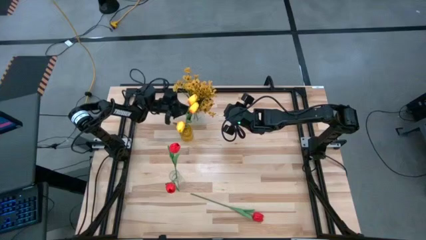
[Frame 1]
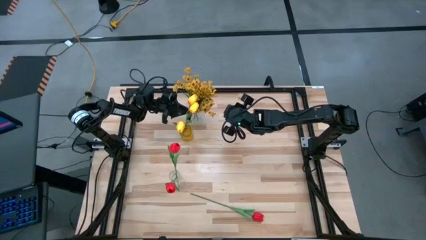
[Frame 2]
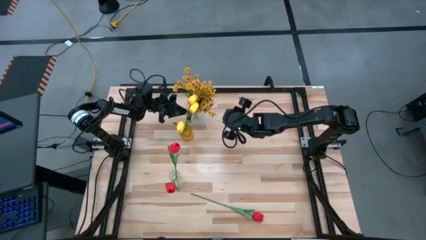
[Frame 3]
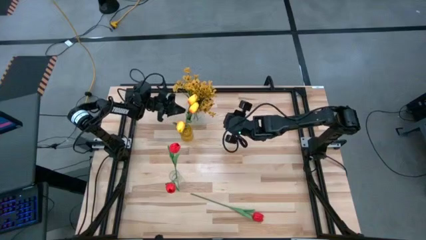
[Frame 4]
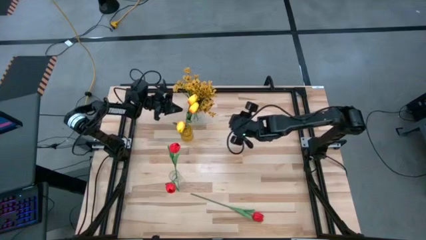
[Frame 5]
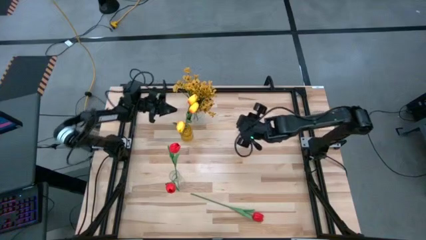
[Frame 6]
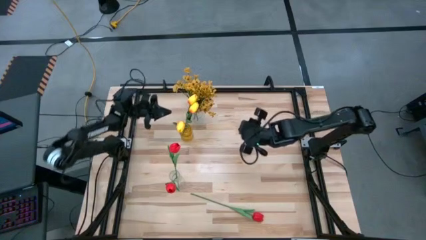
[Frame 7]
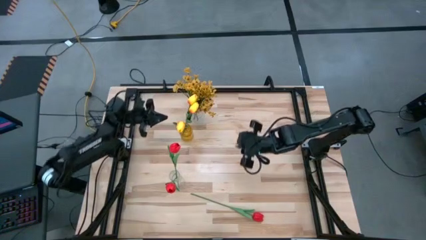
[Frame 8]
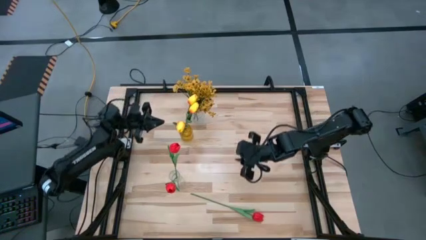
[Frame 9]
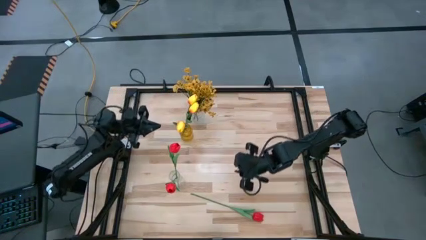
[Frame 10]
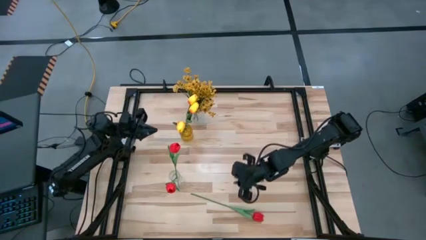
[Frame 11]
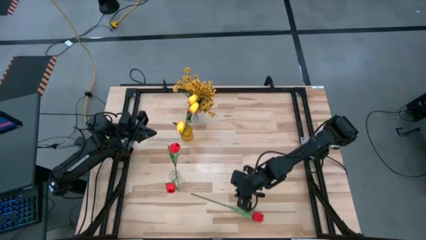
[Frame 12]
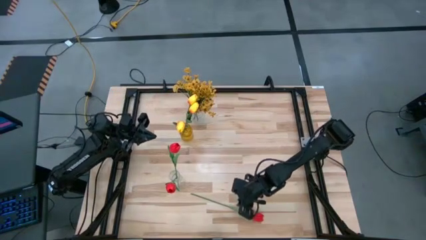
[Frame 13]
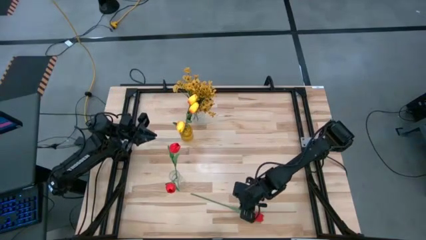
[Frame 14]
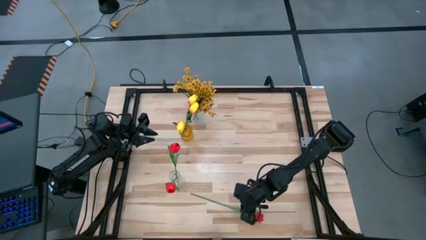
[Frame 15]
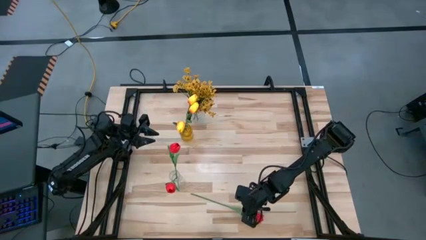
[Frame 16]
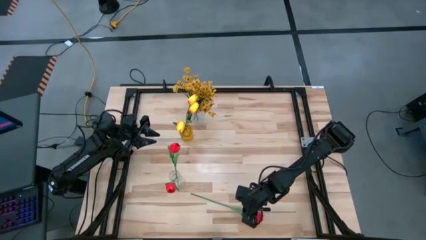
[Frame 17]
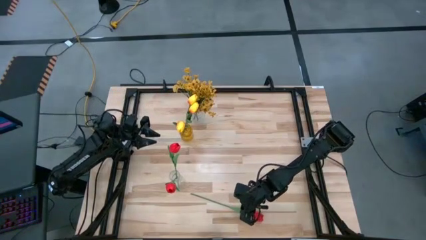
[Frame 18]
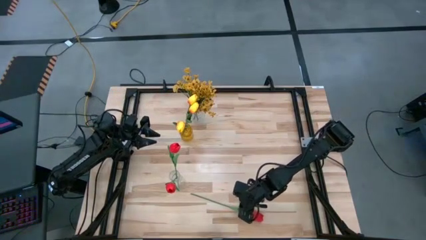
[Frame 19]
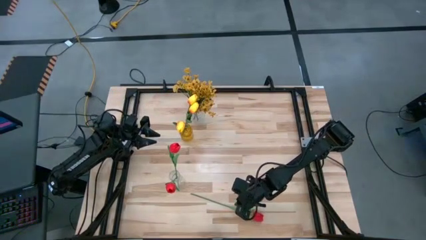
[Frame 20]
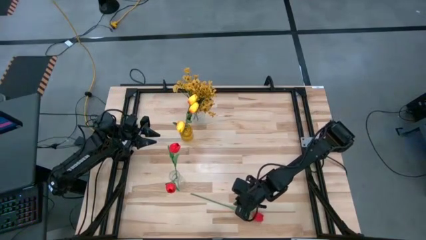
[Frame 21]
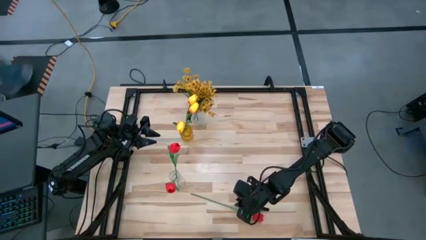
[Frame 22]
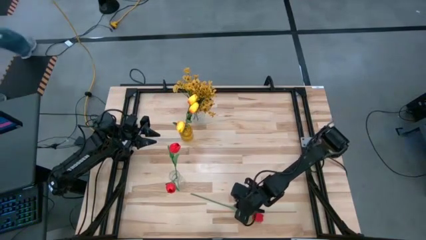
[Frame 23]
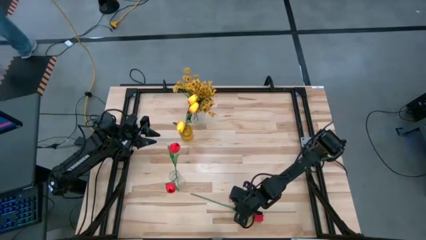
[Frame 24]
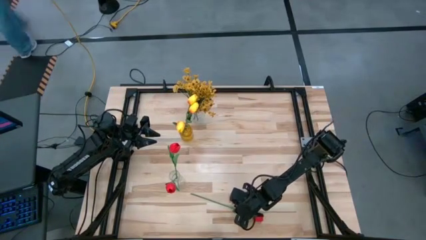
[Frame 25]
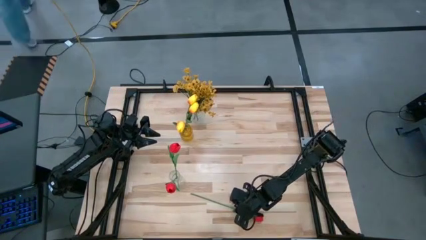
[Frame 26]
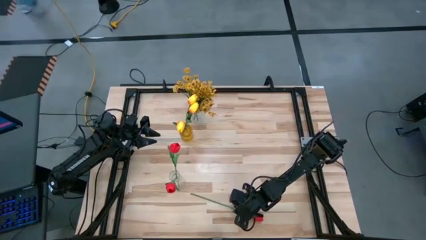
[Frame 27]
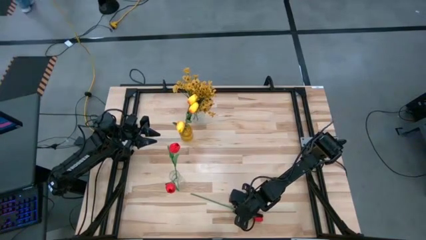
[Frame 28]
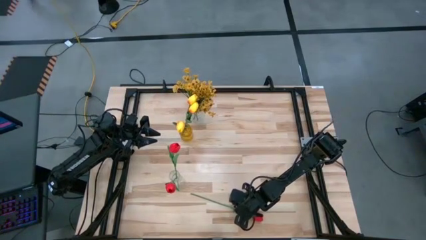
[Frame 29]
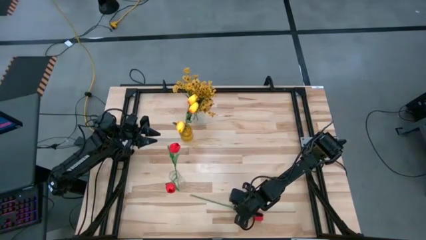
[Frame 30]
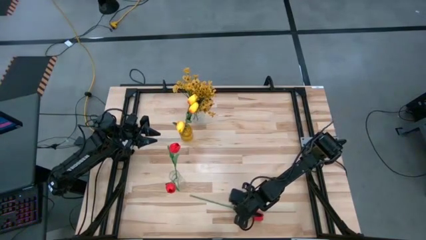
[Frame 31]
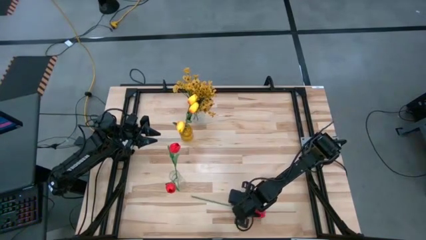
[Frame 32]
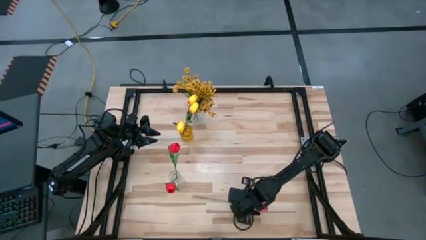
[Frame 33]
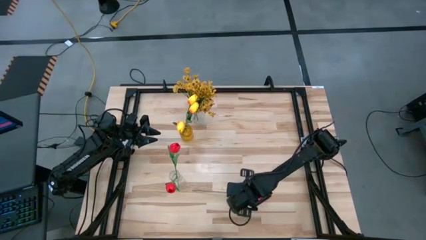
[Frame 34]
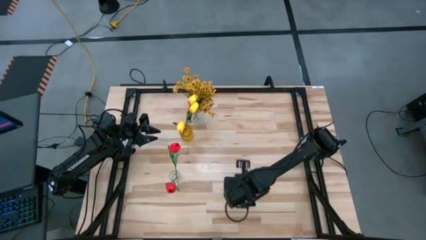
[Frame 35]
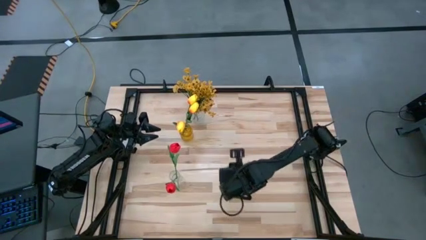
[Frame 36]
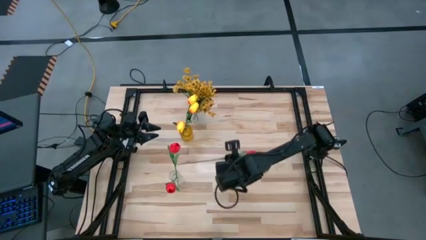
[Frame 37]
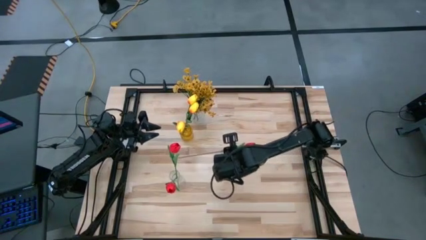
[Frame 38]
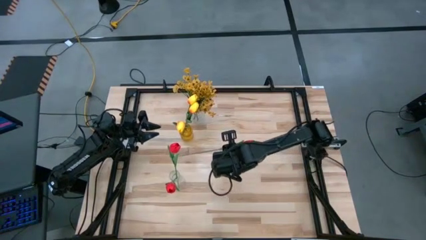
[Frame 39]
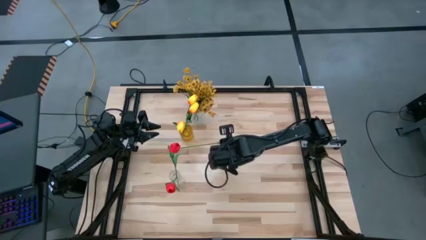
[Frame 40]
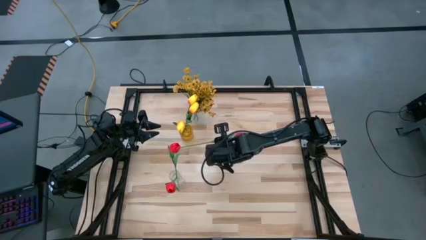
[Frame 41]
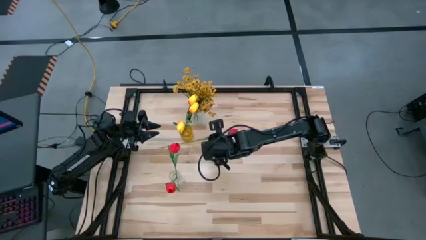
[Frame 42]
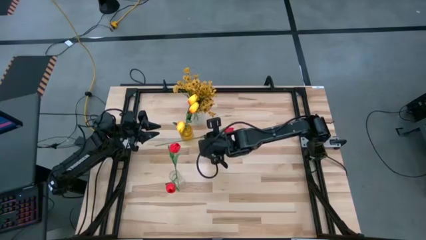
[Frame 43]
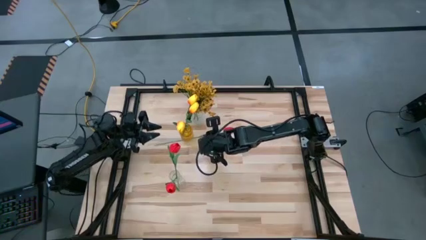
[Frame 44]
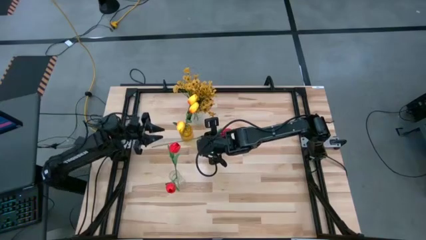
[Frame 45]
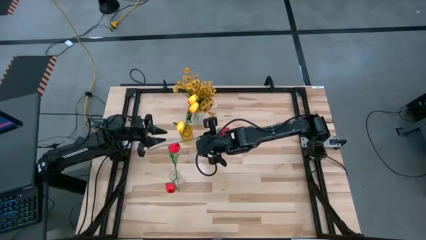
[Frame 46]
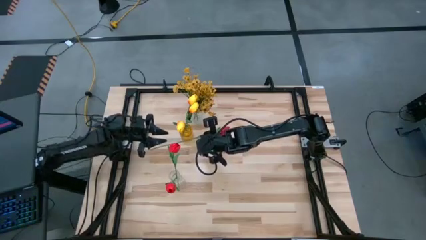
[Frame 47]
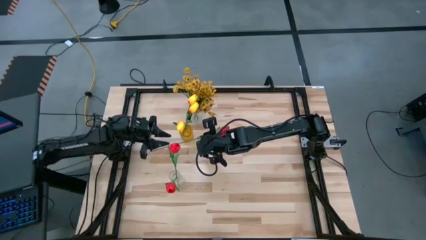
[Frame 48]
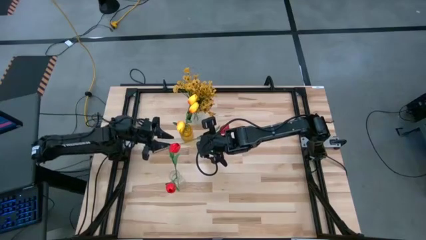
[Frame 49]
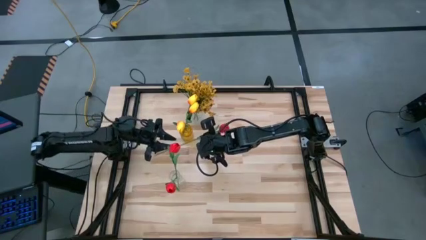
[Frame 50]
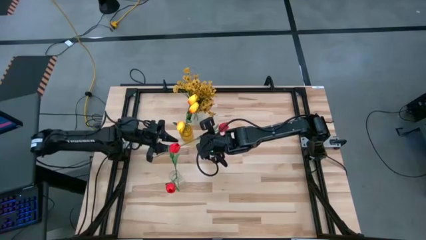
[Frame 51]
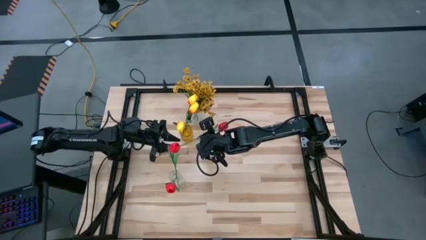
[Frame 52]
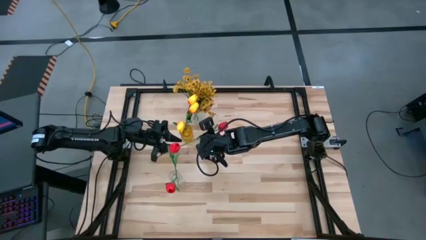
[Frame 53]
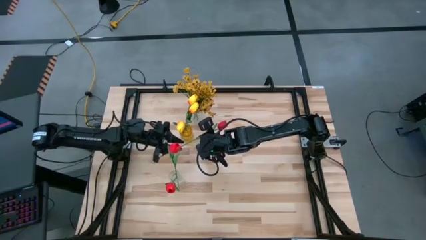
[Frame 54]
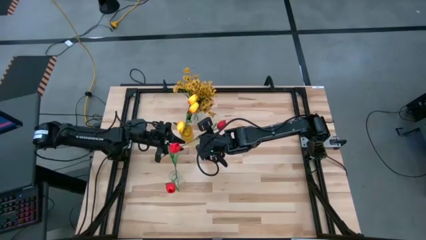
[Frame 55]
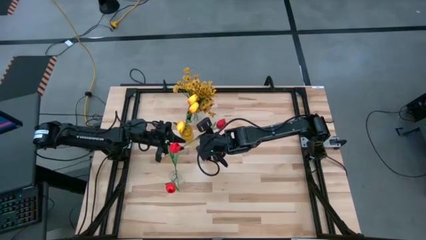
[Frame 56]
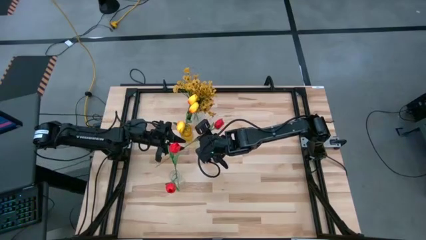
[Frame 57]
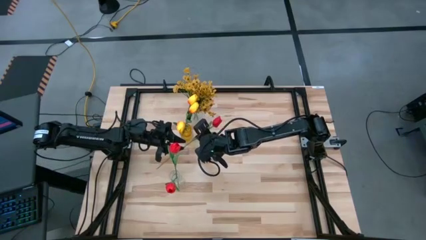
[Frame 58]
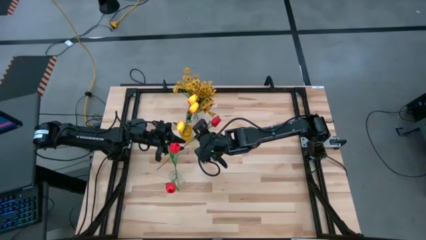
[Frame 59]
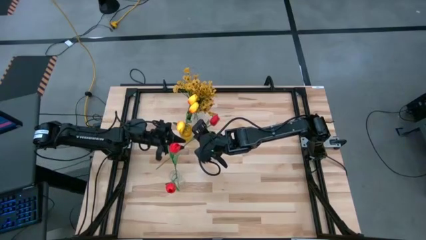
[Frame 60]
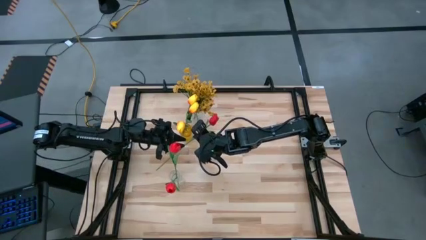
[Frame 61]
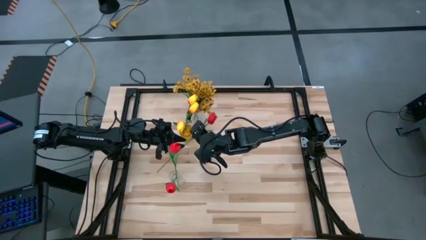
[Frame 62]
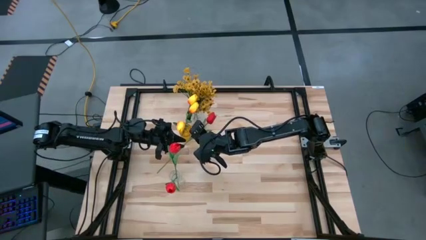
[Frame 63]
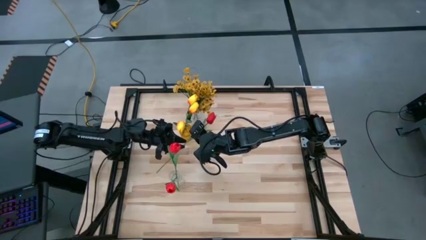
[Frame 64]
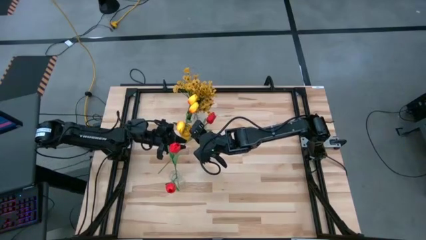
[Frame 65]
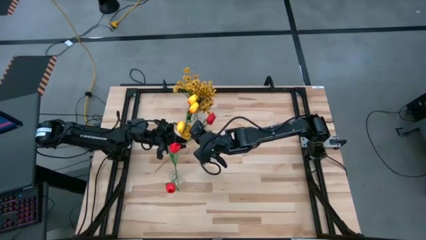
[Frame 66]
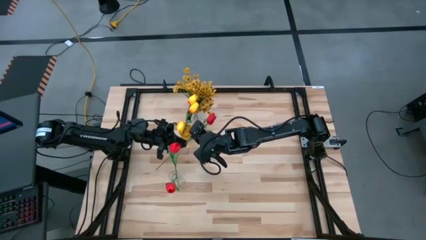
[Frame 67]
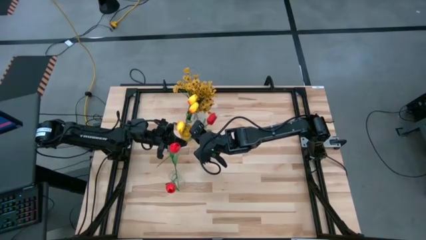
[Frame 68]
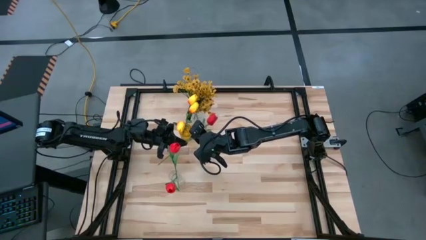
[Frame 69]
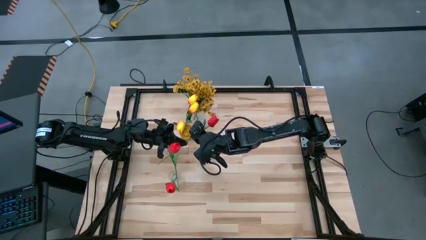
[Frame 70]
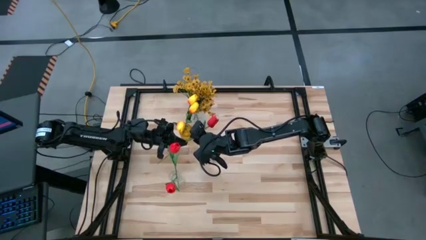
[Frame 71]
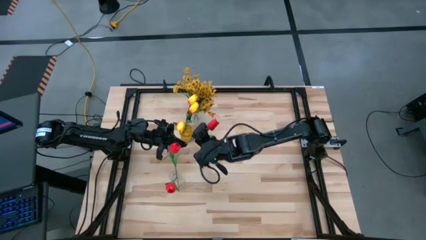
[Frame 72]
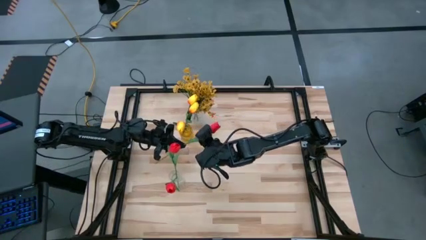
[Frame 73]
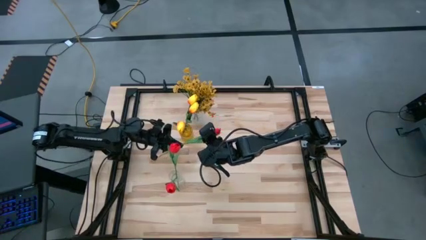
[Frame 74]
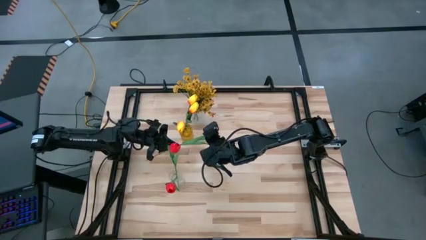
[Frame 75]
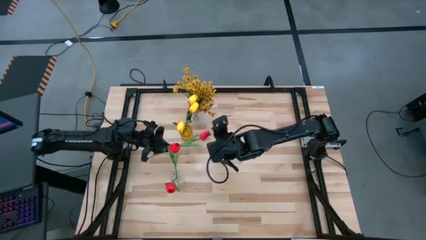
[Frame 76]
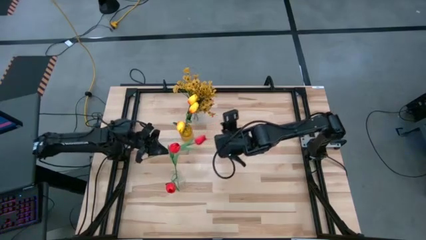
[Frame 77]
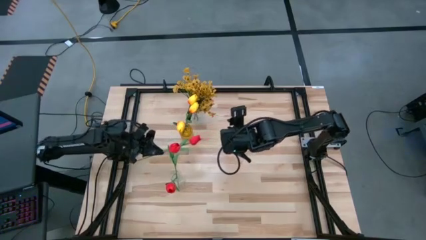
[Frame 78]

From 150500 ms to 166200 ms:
Task: Sort flowers into vase by color
Put the red tulip into the bottom transparent vase

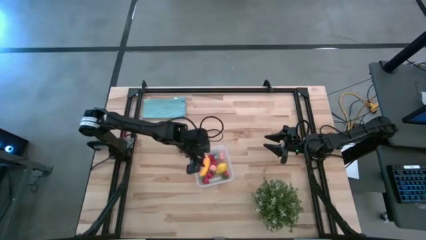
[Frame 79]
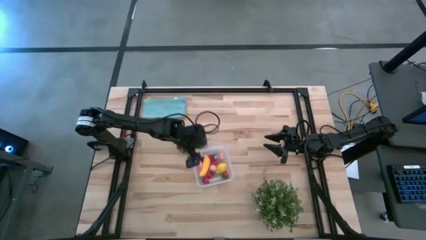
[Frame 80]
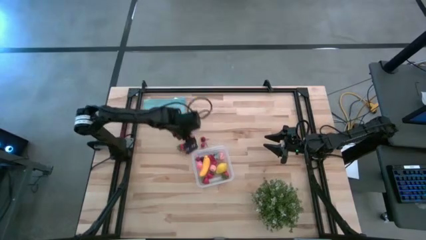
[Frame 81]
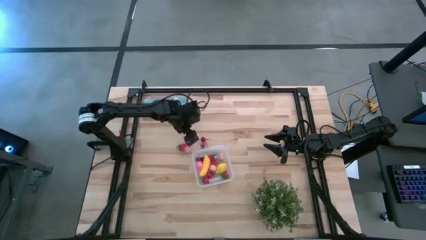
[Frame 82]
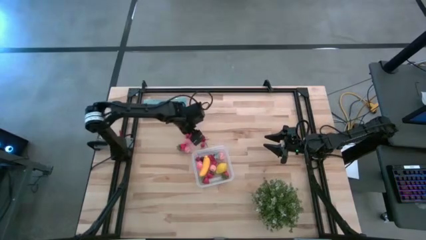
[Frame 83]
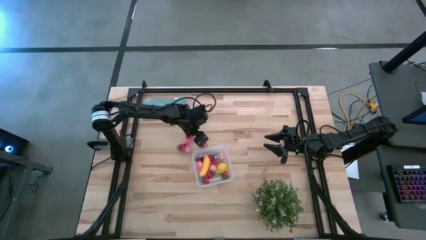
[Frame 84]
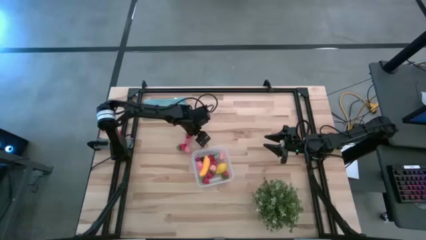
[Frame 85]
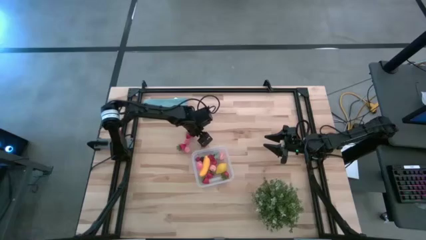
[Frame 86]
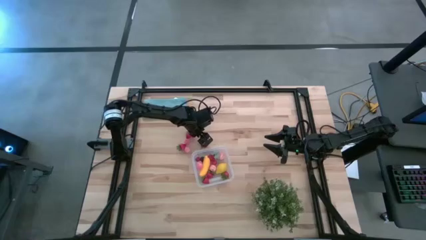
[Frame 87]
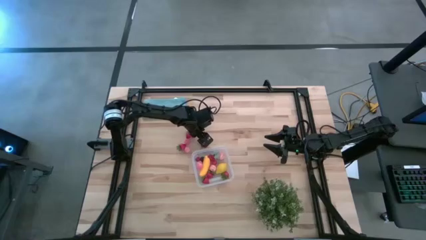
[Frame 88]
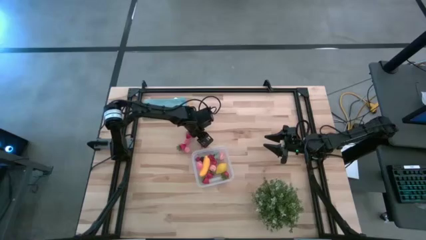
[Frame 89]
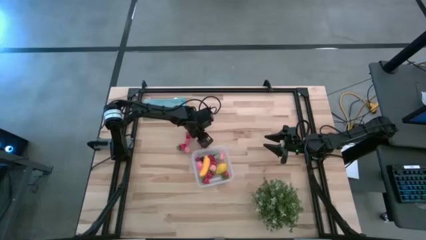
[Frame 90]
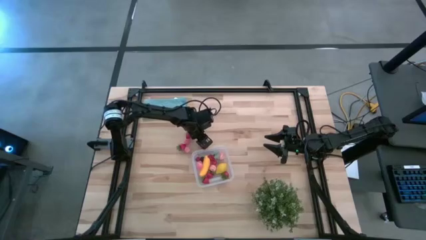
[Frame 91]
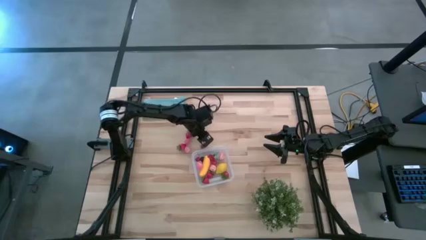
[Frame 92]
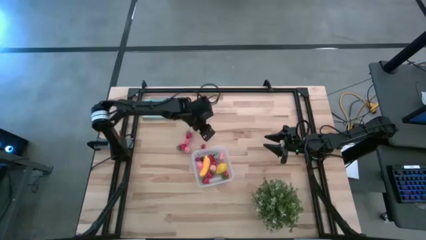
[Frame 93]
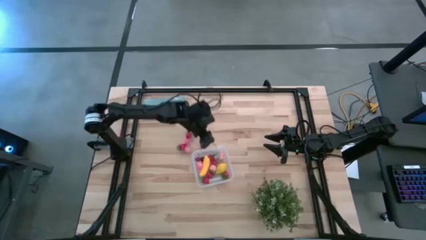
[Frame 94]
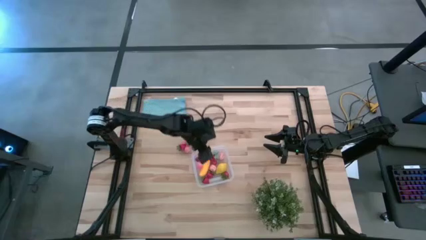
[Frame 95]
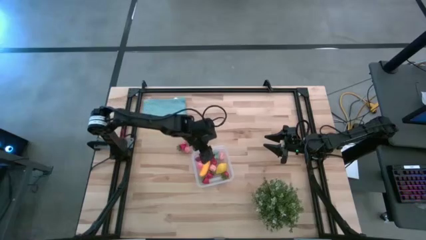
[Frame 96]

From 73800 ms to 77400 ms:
Task: Pick and placing Produce into tupperware
Put the red cherry into the transparent bin
